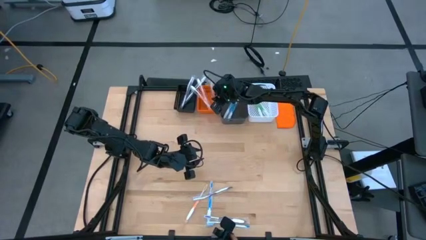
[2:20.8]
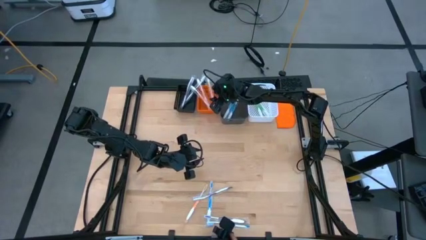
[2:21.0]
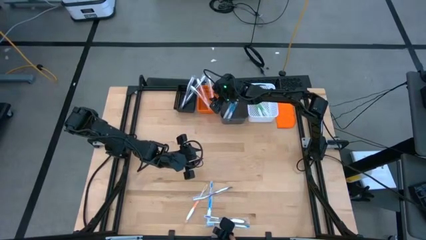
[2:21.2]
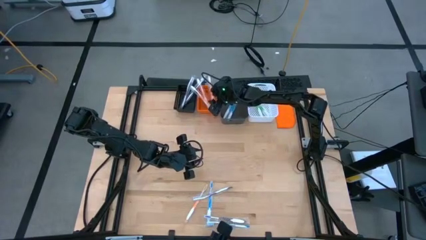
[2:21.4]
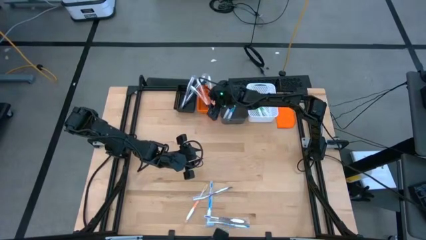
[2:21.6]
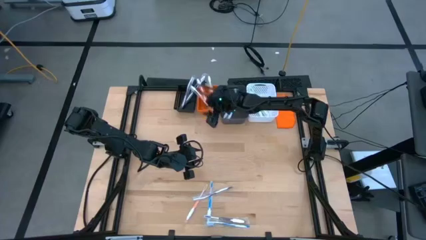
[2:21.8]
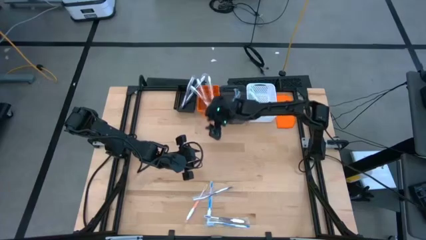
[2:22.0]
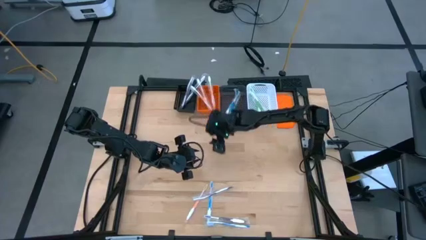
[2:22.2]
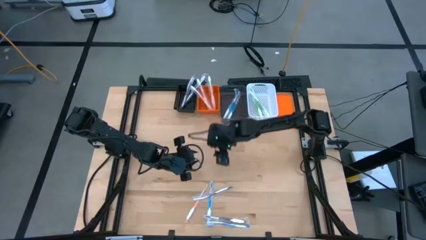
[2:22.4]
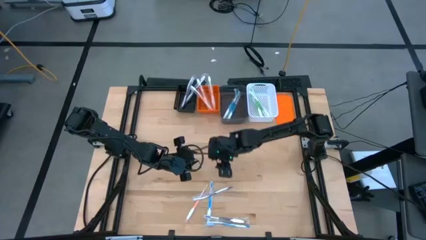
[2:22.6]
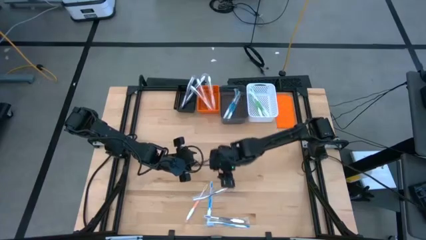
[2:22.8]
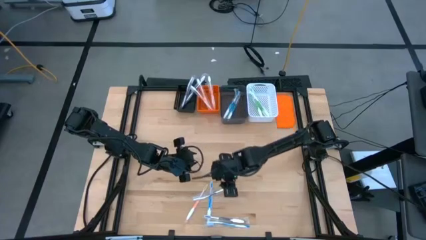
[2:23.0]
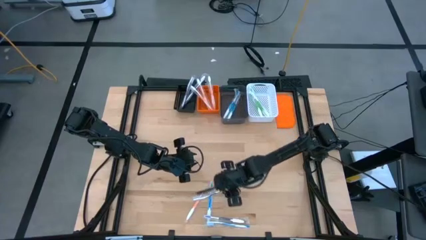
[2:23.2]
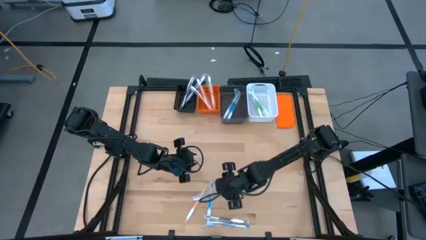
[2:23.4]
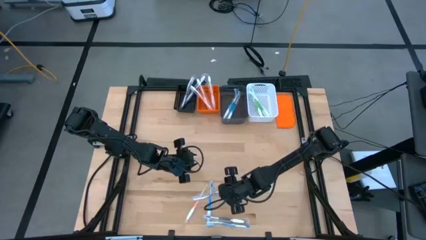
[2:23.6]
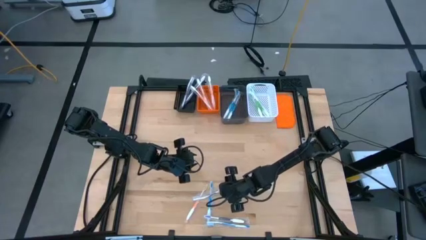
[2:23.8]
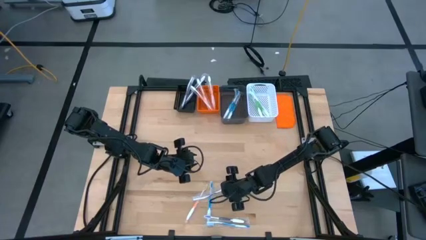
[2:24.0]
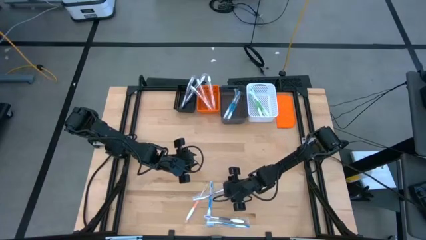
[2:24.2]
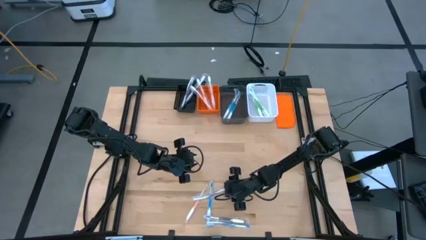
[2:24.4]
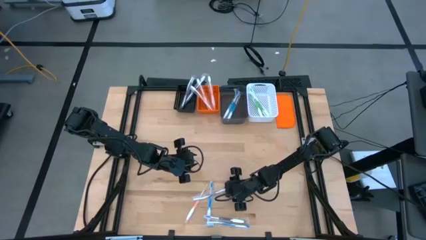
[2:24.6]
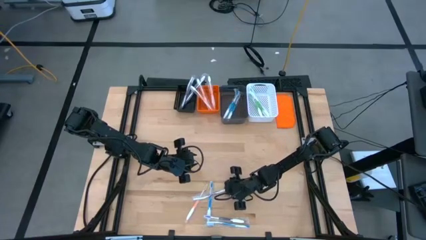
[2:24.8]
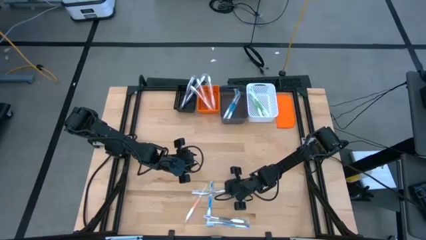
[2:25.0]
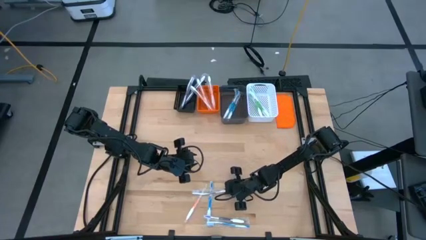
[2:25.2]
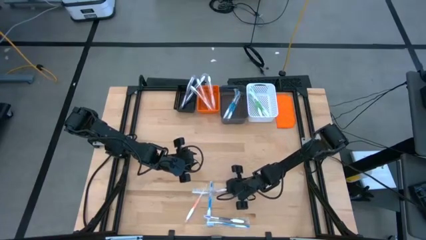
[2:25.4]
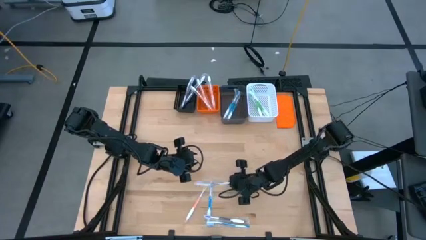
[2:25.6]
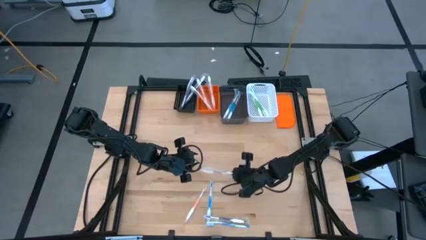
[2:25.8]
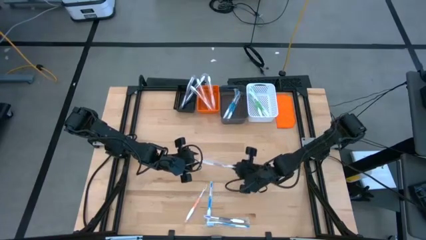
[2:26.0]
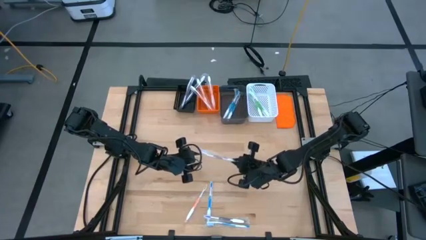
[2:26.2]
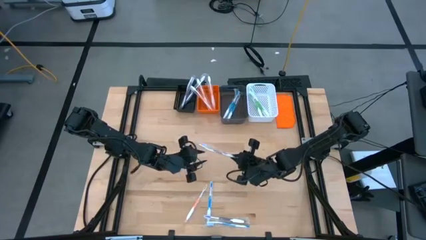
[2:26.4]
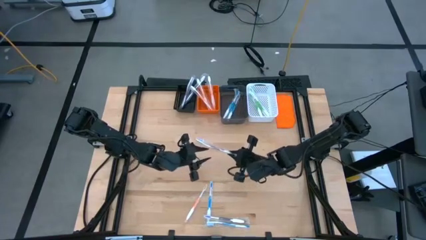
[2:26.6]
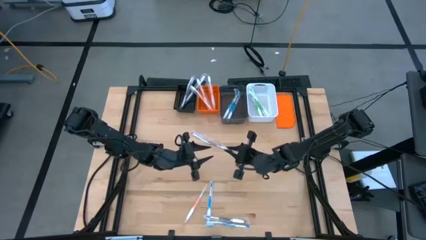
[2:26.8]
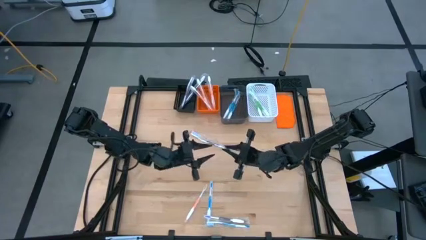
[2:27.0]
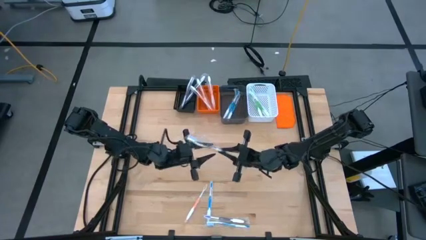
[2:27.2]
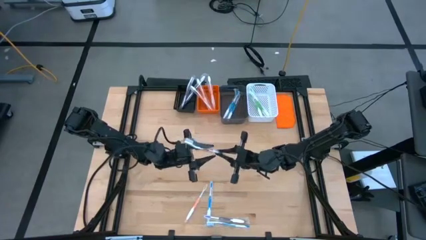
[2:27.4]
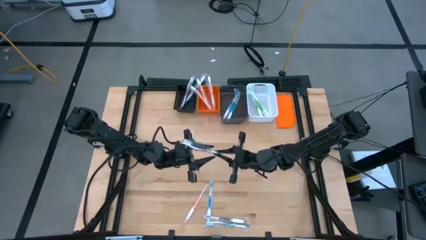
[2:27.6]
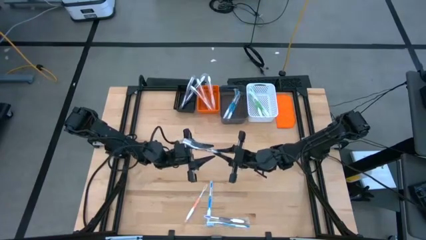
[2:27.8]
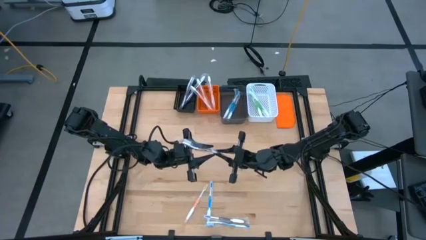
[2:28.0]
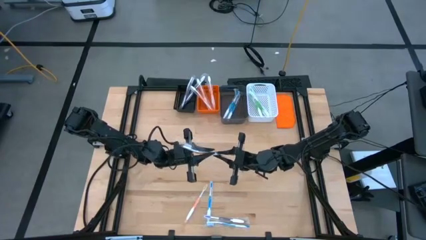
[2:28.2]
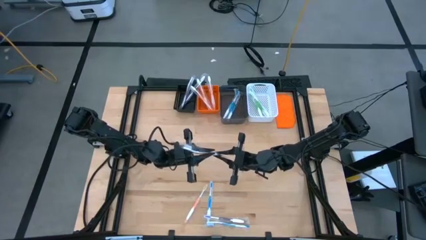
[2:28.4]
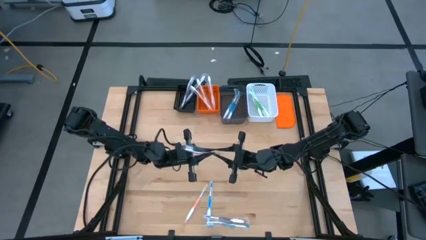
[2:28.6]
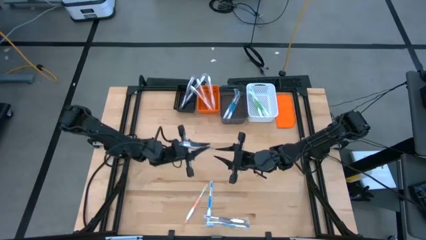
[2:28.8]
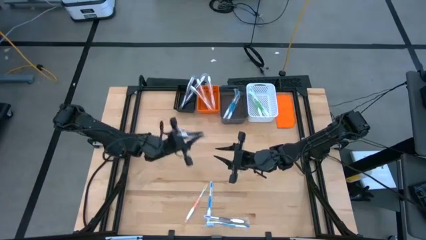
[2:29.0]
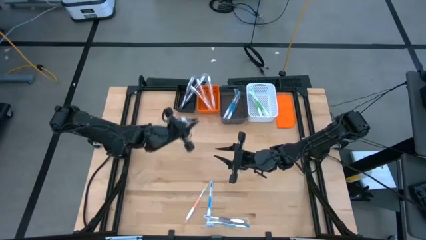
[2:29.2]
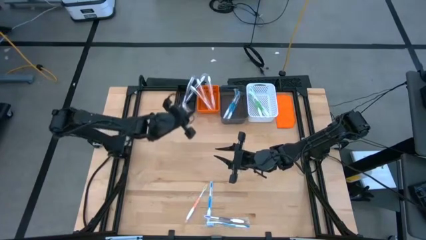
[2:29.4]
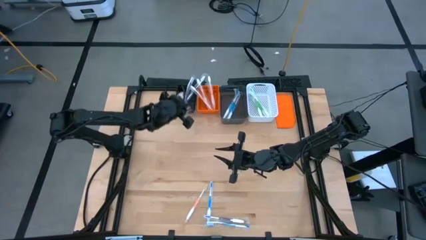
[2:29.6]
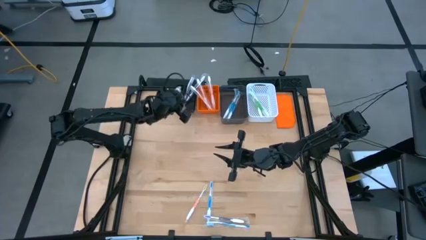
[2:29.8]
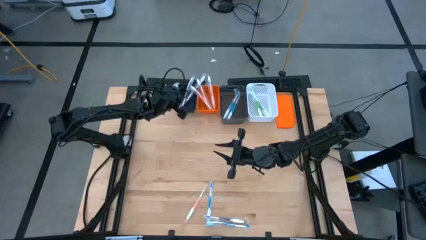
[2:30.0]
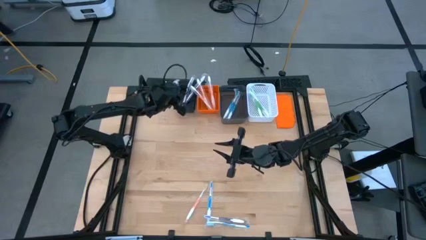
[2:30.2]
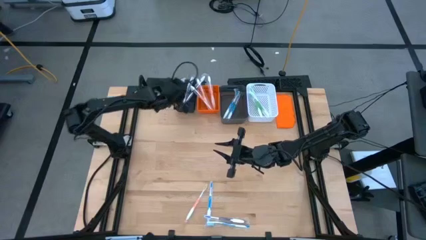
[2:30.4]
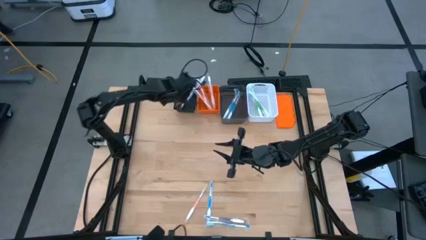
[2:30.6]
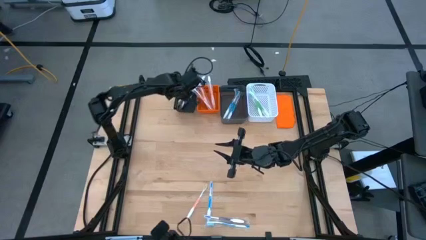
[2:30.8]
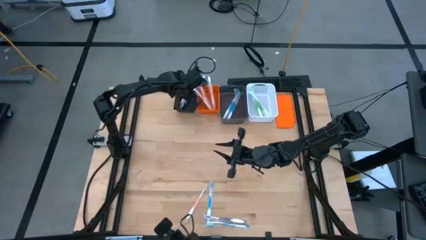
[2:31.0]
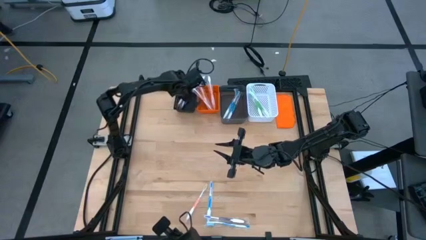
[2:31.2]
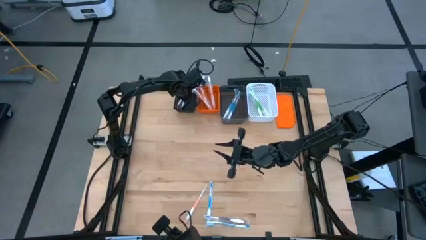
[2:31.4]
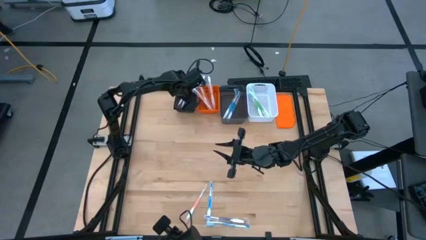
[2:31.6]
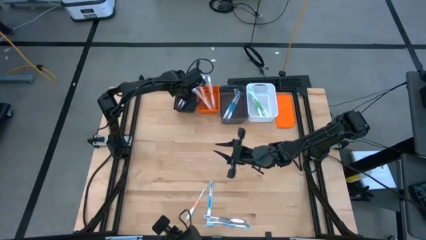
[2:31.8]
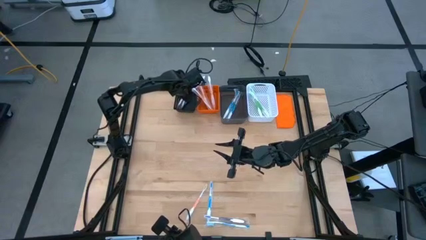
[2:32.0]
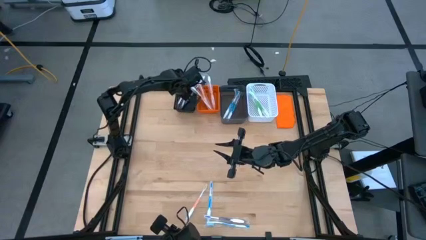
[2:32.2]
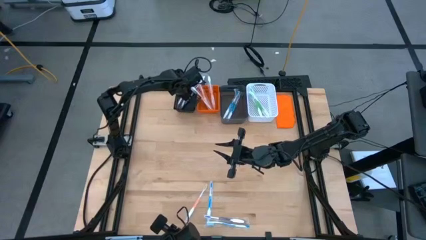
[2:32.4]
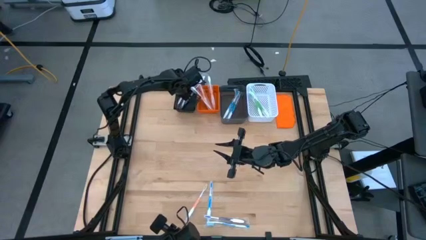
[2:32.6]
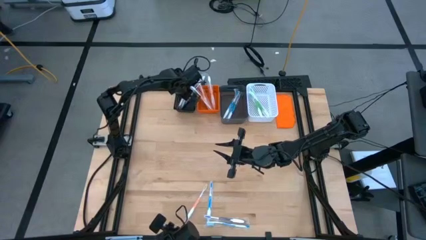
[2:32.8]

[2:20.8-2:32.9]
Task: Pick & Place Toothbrushes
Put the purple toothbrush into the black bin

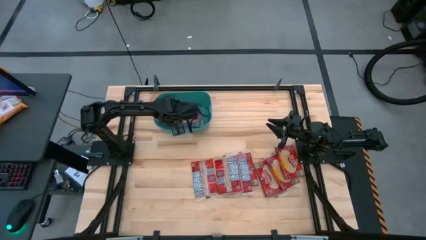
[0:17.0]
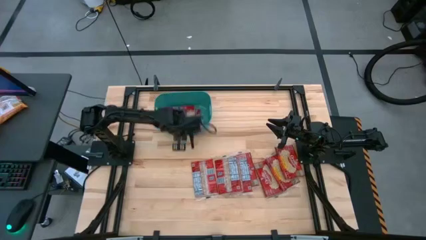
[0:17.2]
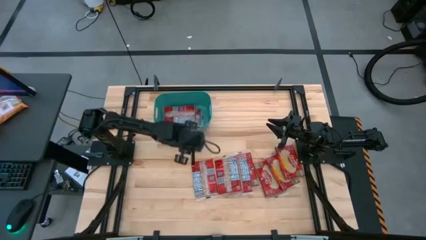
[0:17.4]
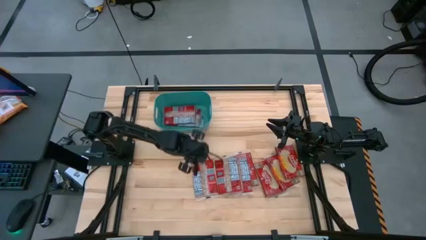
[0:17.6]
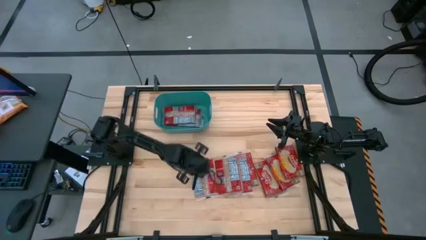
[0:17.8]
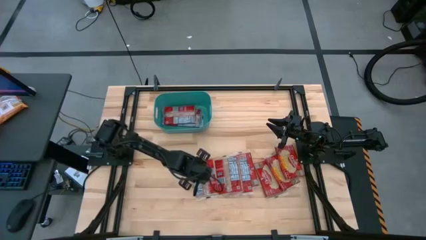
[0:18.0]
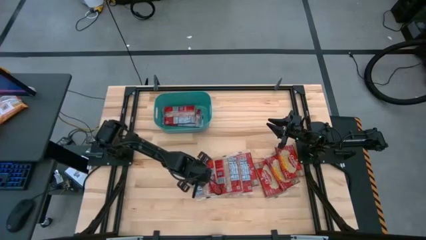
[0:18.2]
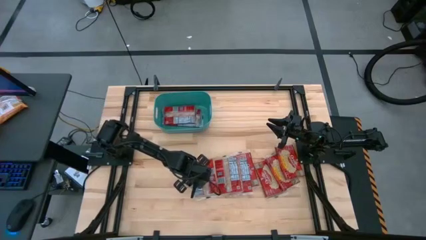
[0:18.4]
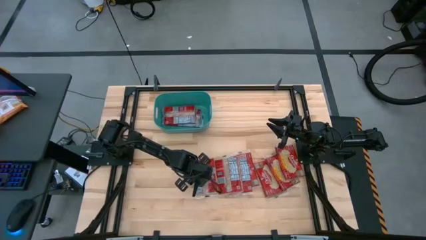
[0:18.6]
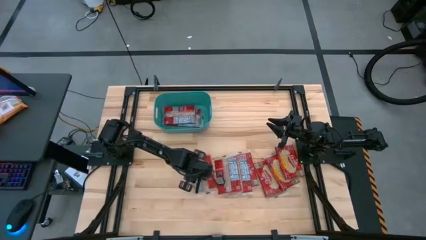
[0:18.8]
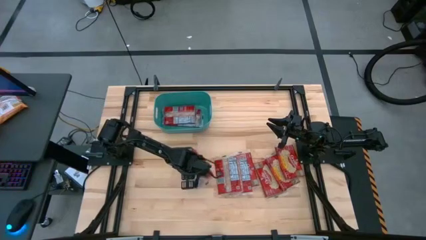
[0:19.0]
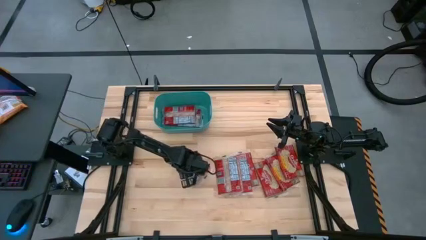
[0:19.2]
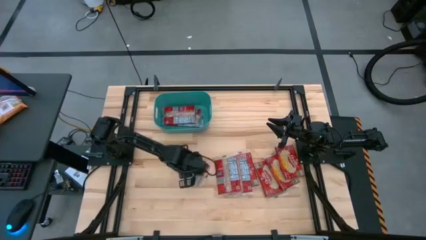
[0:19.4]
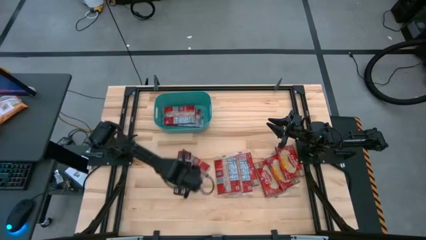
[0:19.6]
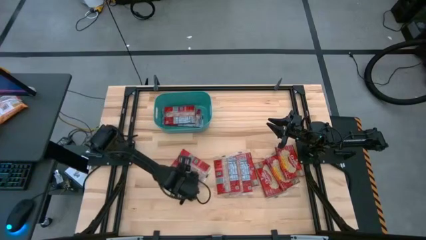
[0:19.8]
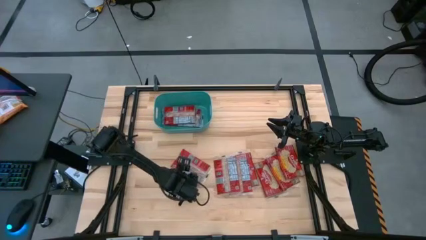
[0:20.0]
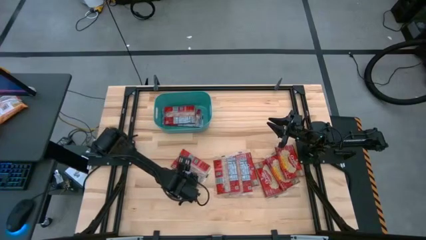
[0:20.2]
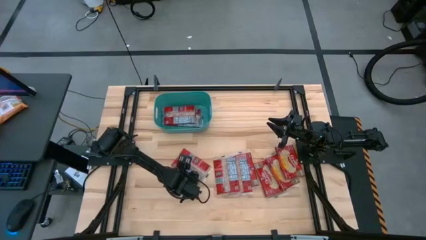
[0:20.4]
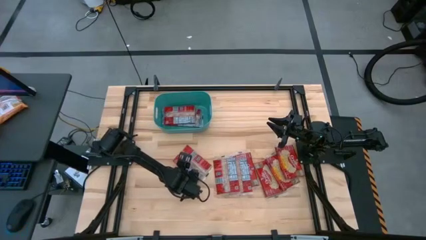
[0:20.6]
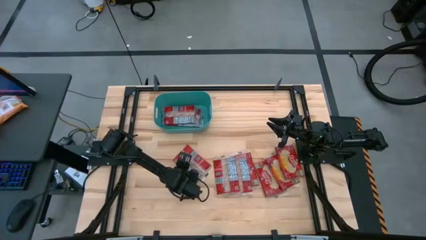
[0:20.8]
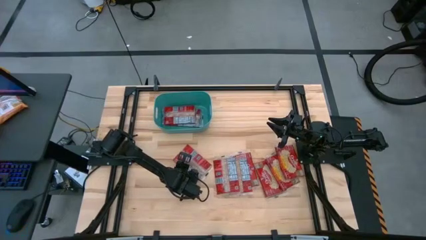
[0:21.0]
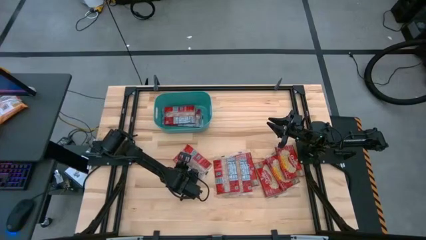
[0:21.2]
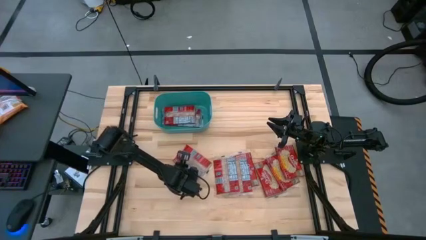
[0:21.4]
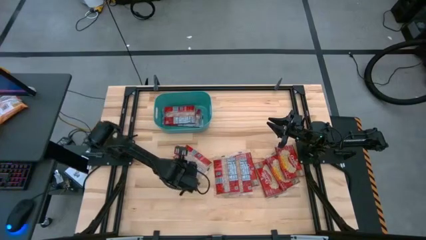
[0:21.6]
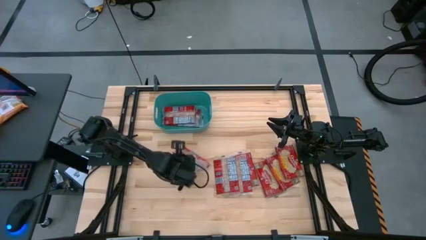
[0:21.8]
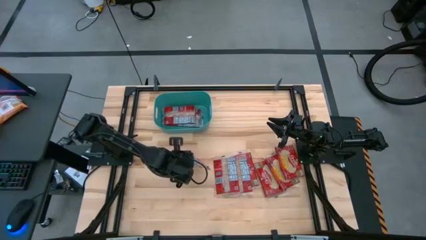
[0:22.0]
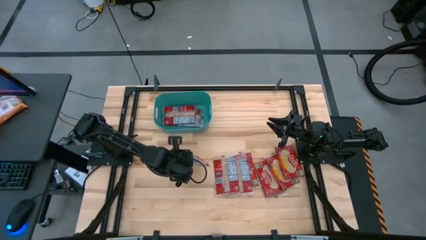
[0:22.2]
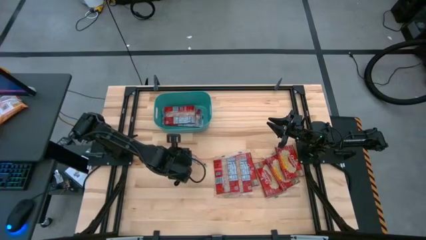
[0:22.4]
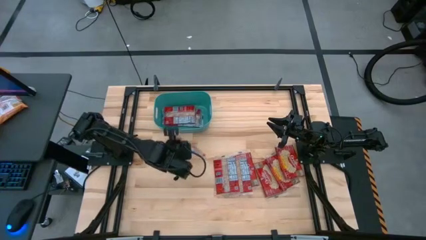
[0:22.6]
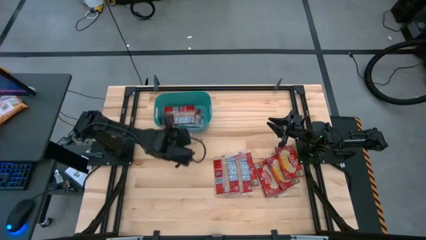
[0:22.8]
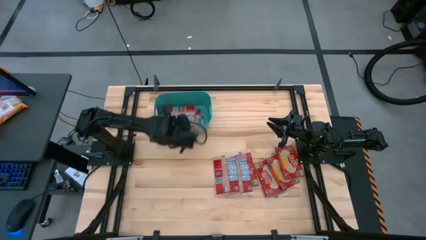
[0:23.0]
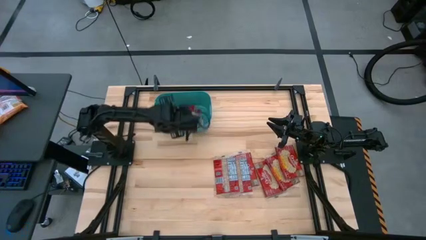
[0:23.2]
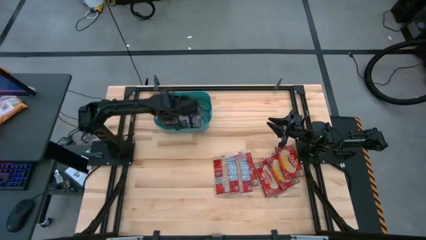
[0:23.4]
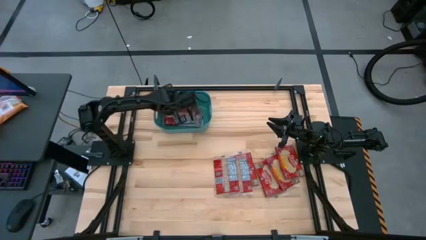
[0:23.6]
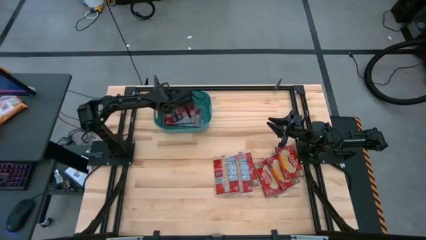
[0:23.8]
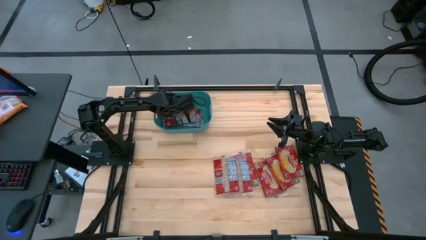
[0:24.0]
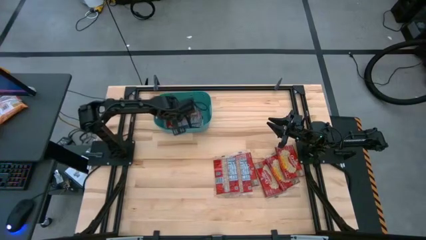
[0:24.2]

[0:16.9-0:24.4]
Task: Sort popcorn bags into baskets
Put the popcorn bag into the green bin
